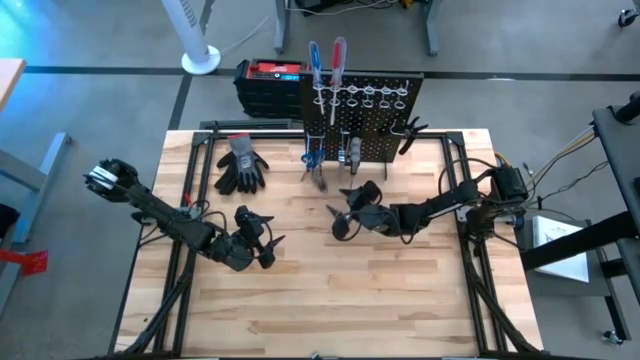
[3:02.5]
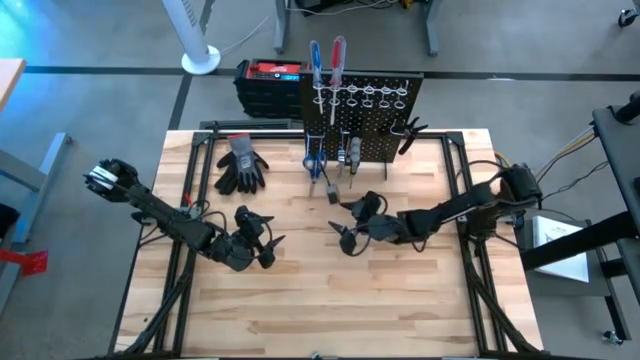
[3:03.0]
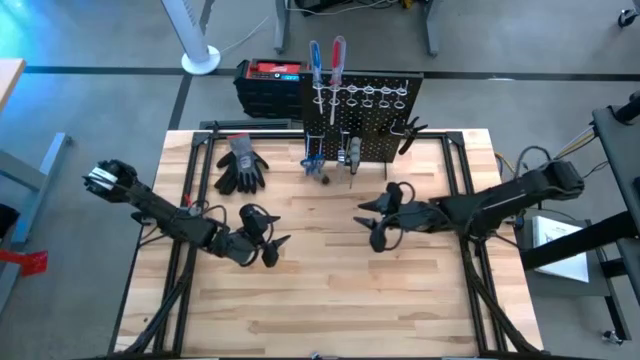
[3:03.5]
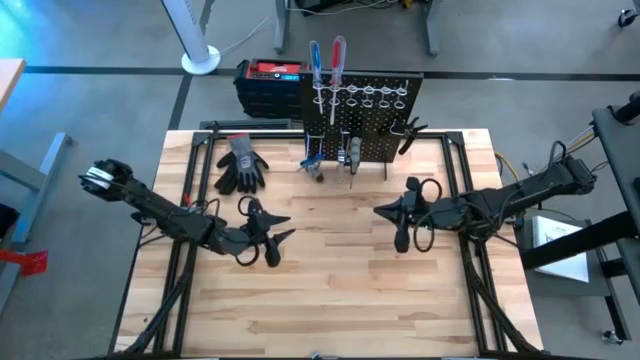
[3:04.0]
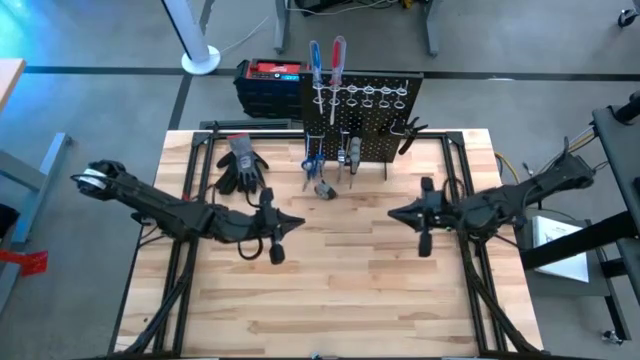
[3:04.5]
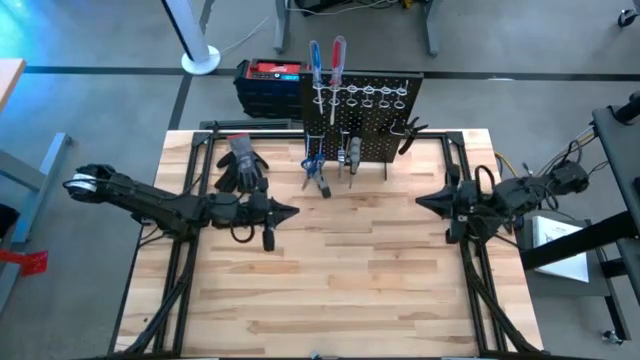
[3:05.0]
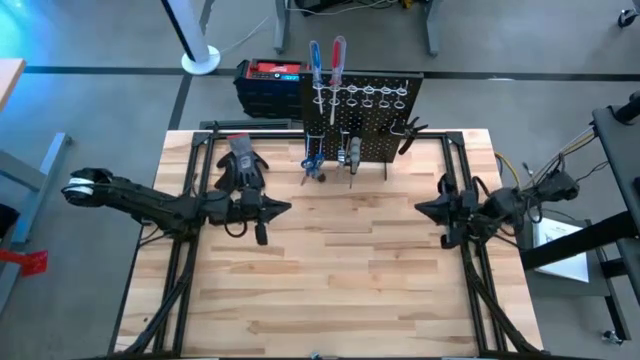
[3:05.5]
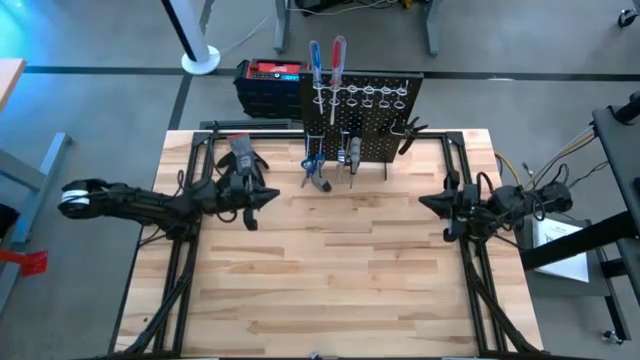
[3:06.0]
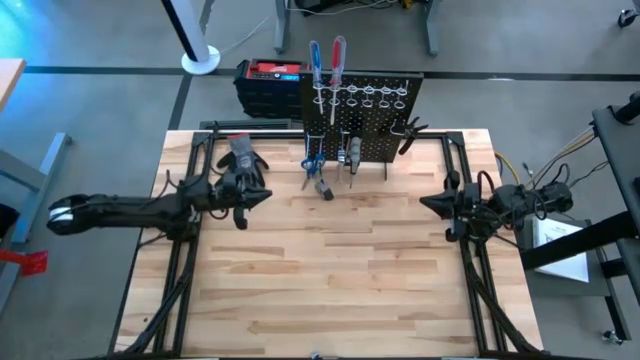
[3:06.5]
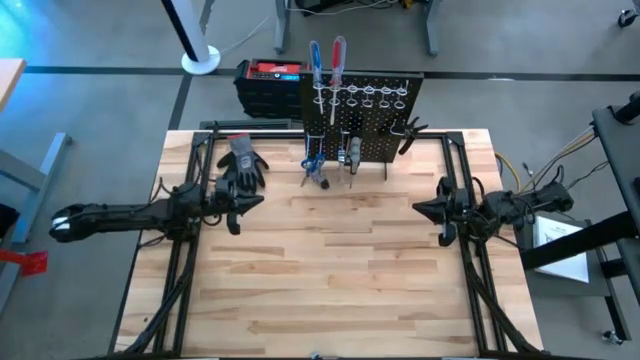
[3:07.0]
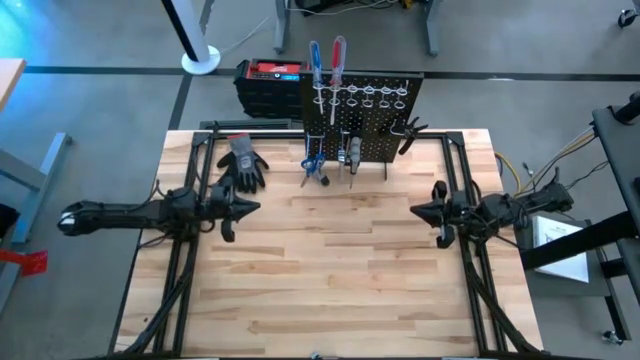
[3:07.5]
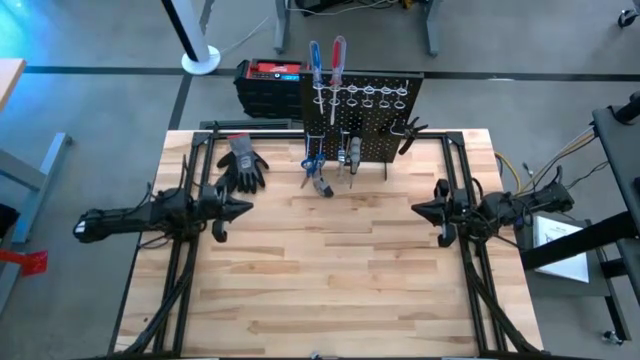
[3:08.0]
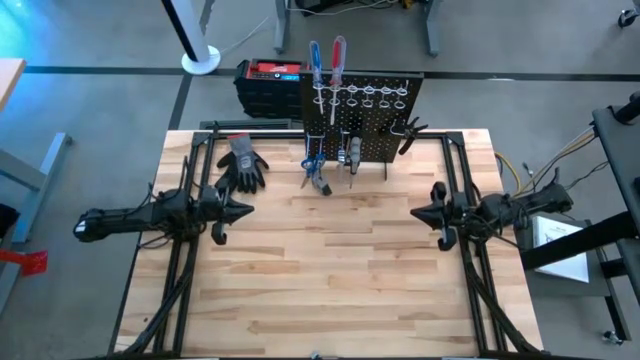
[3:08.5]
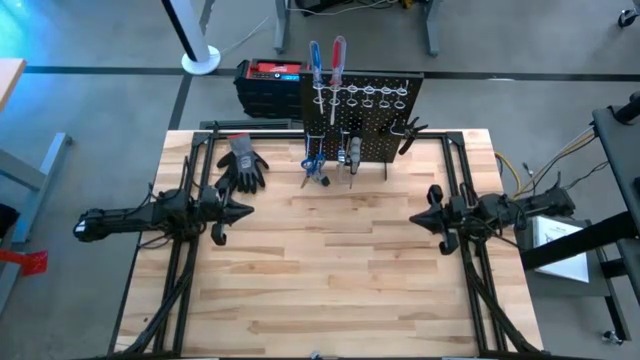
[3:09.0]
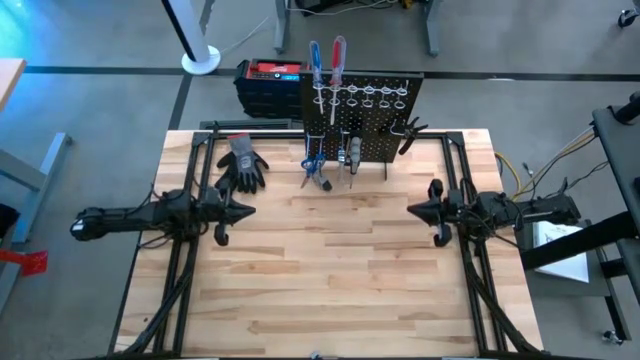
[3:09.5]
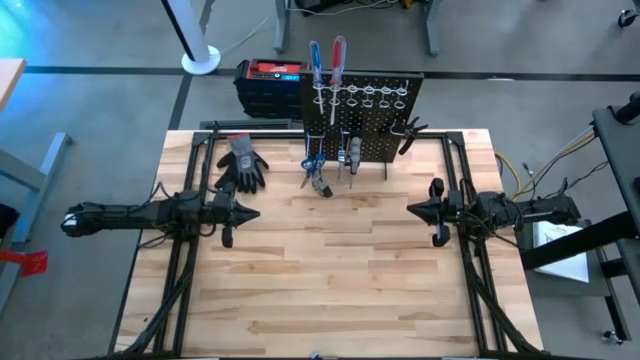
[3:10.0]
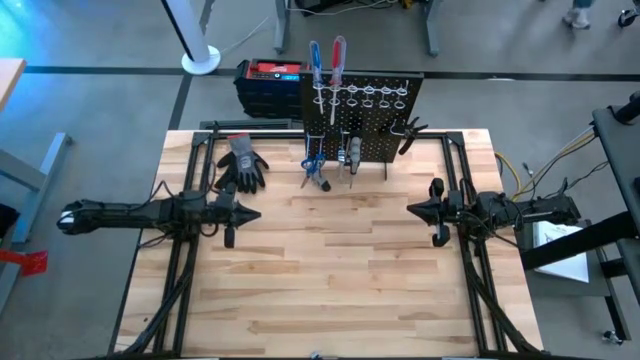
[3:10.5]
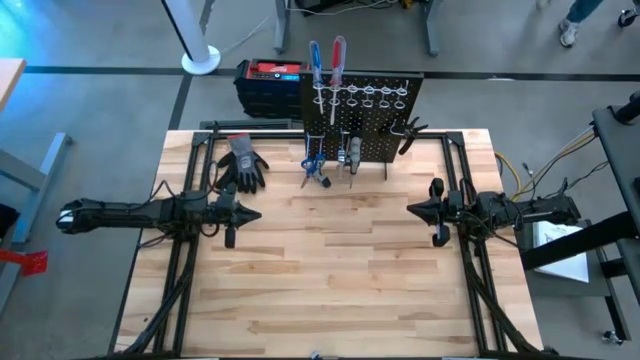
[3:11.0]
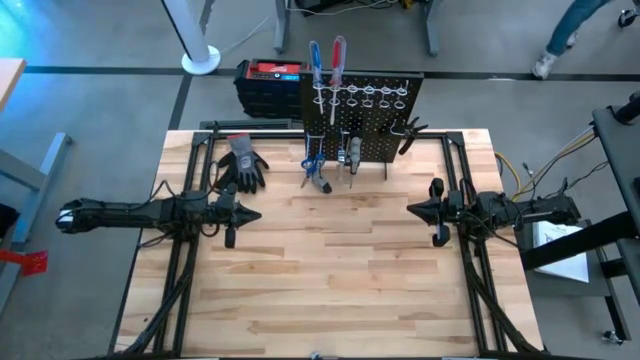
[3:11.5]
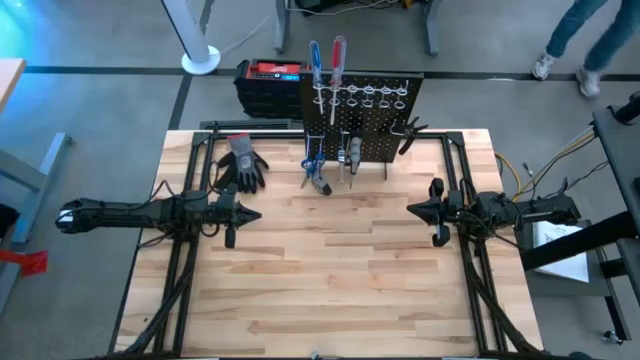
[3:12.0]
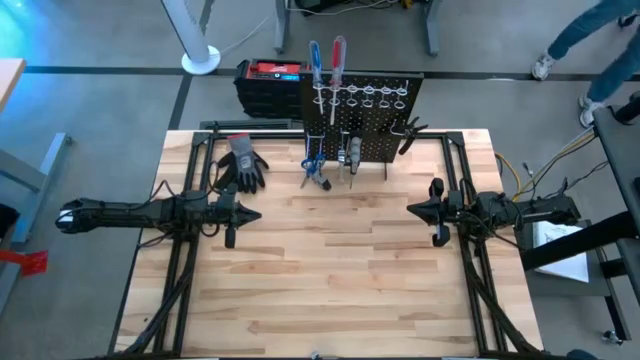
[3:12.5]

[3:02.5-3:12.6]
Task: Hang tools onto peg board
Return to Home Position

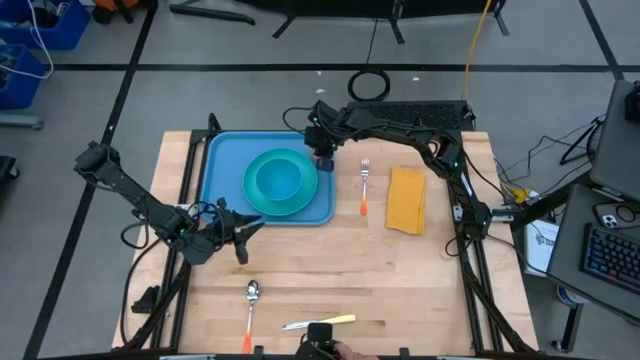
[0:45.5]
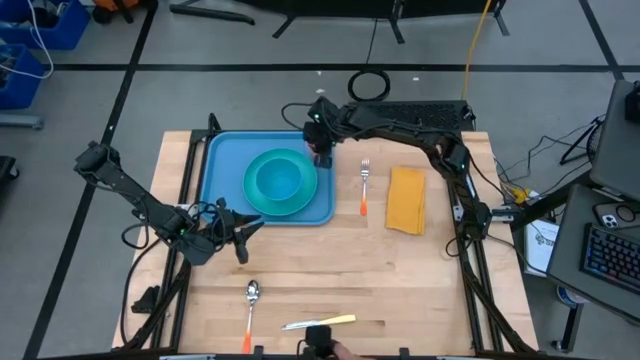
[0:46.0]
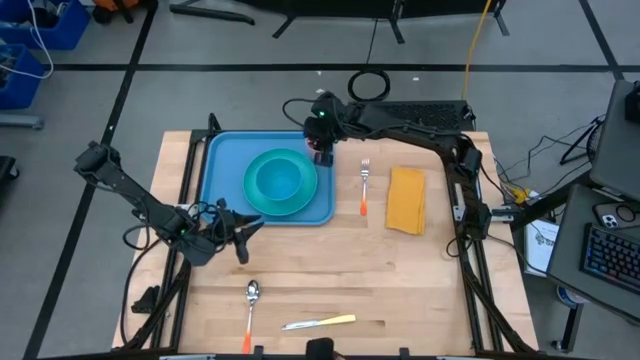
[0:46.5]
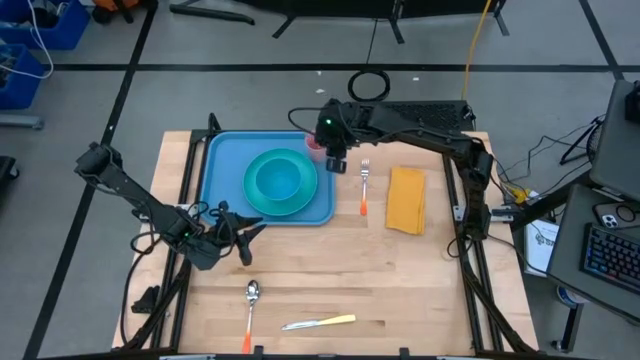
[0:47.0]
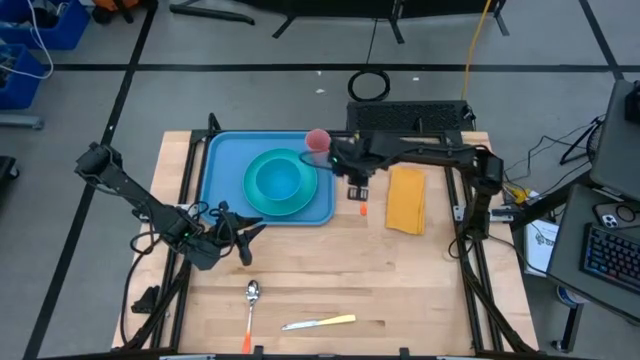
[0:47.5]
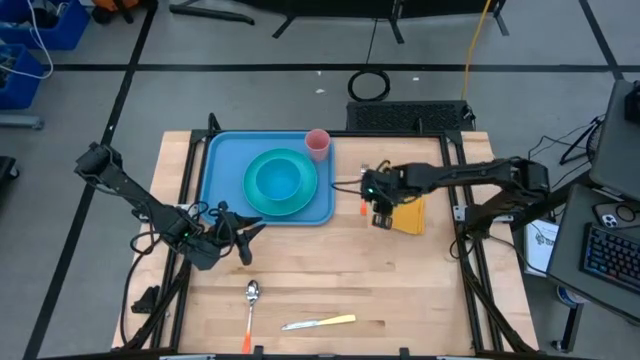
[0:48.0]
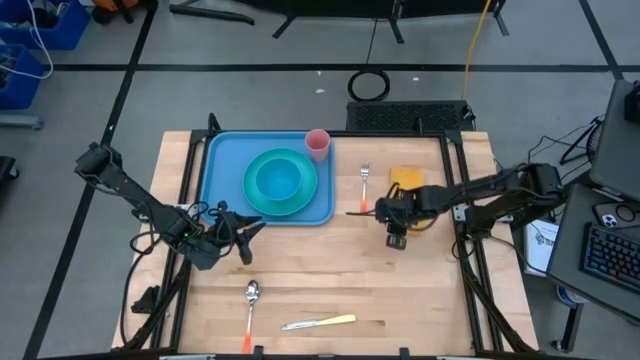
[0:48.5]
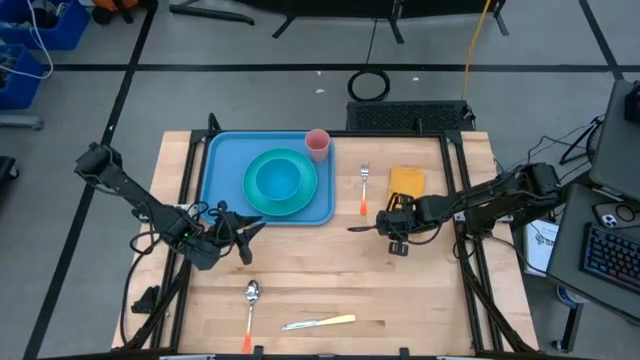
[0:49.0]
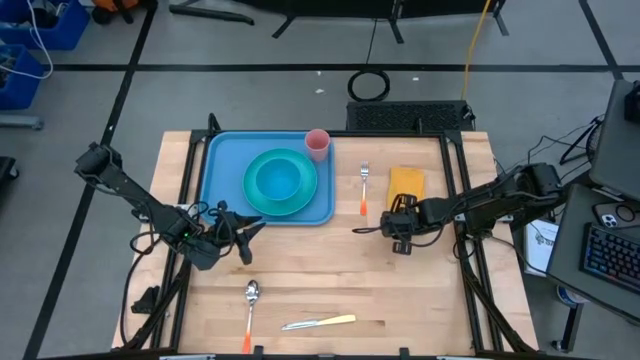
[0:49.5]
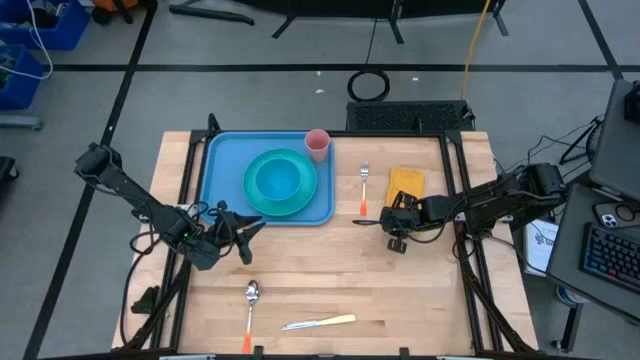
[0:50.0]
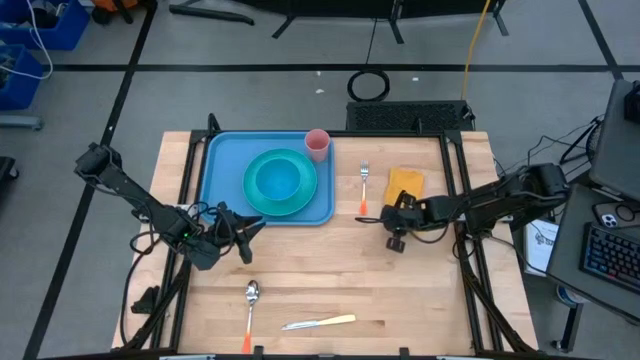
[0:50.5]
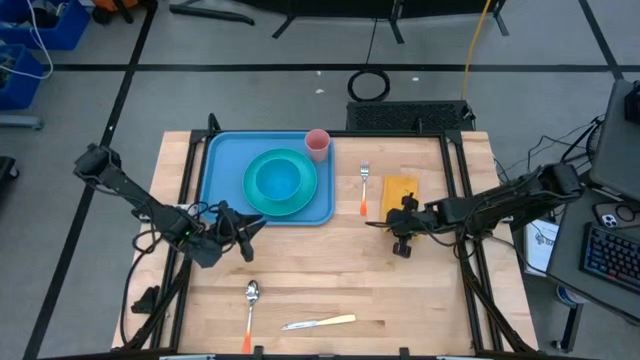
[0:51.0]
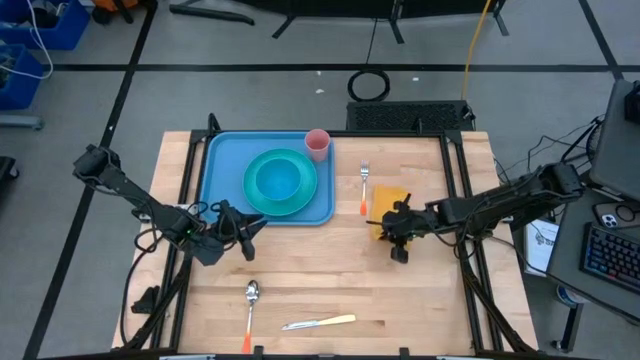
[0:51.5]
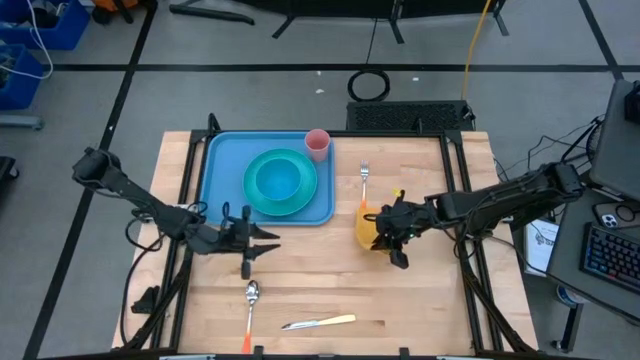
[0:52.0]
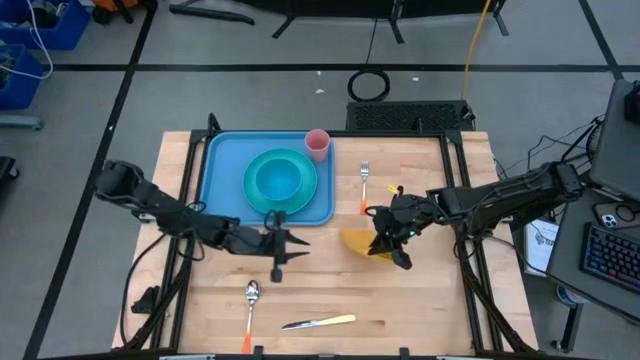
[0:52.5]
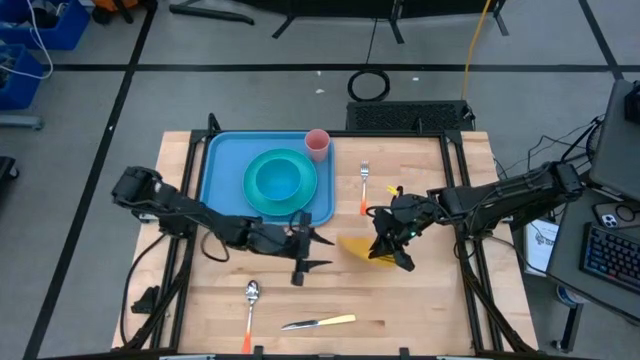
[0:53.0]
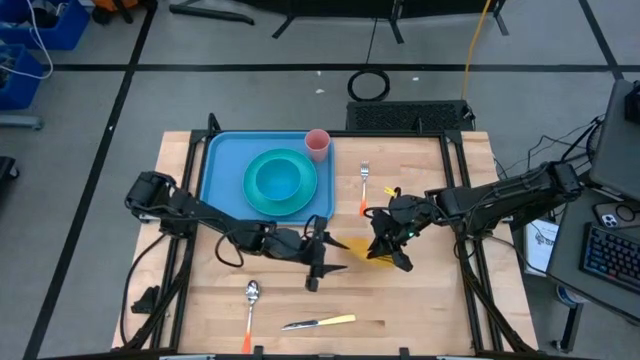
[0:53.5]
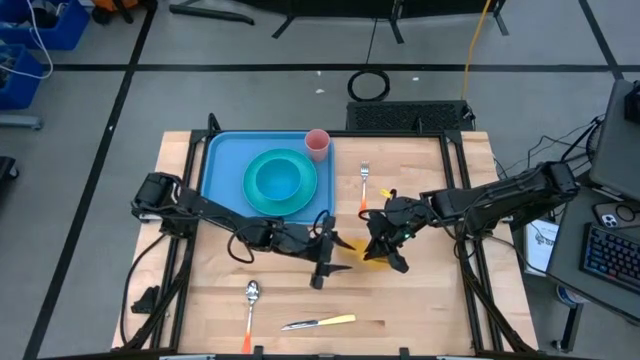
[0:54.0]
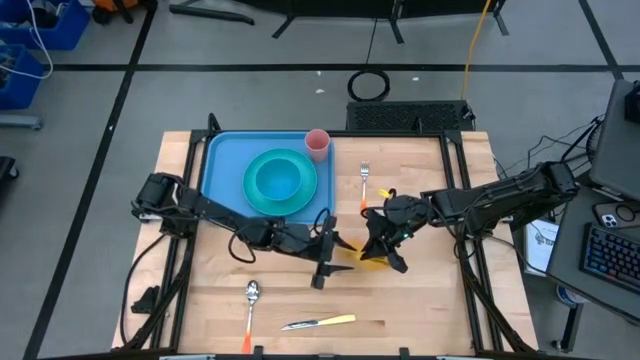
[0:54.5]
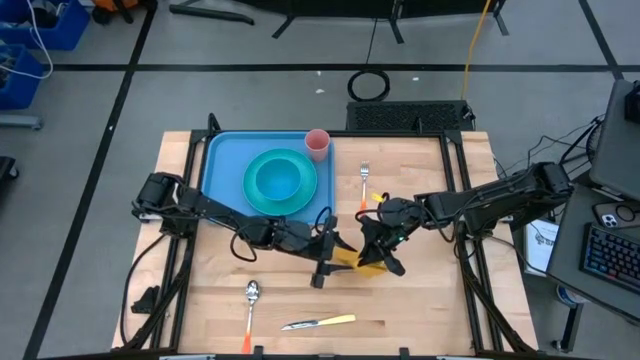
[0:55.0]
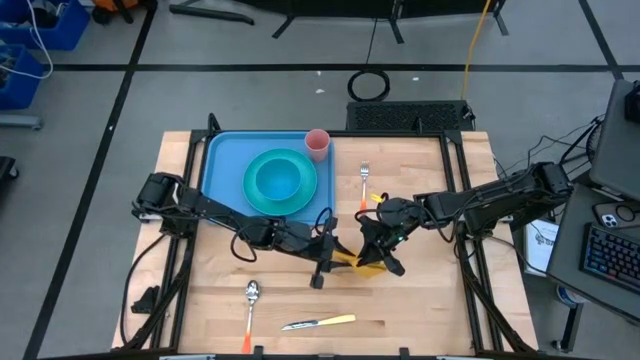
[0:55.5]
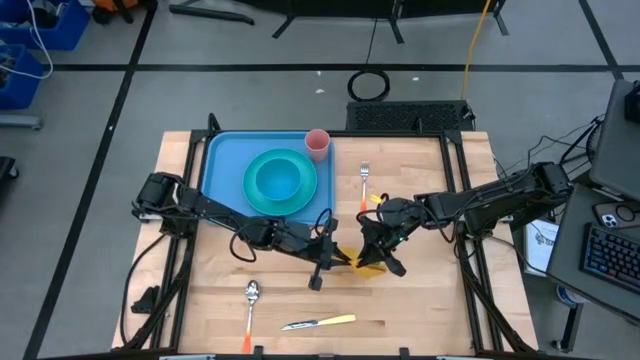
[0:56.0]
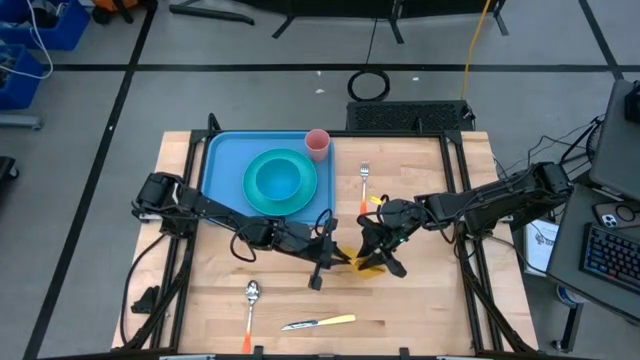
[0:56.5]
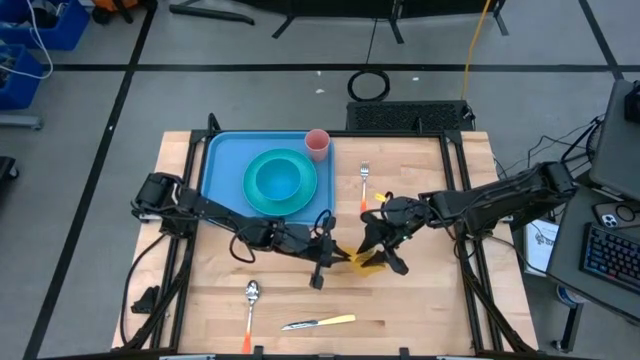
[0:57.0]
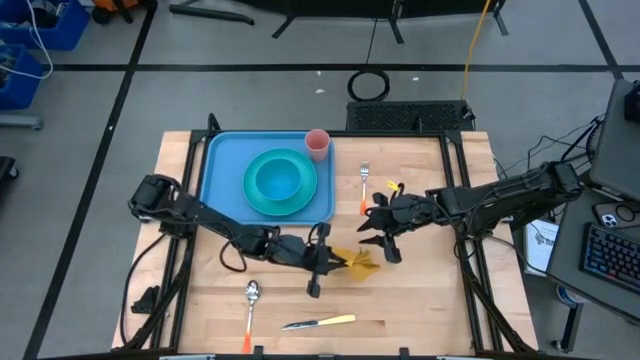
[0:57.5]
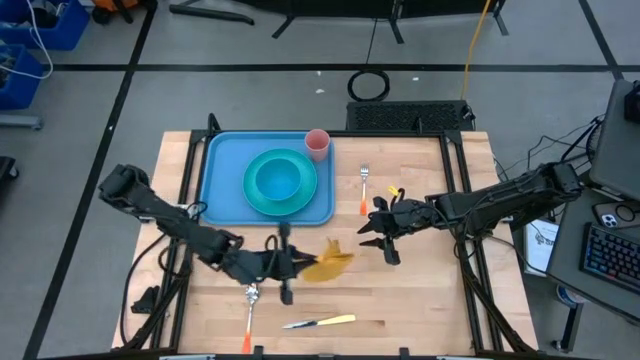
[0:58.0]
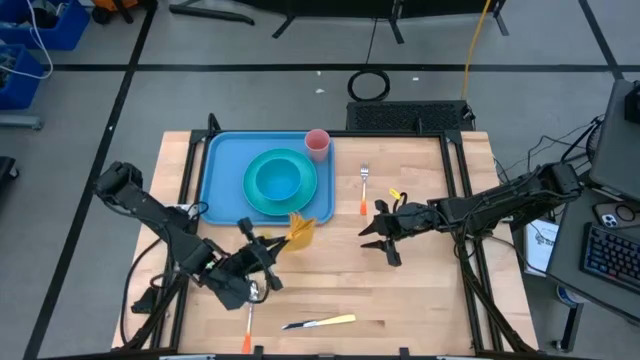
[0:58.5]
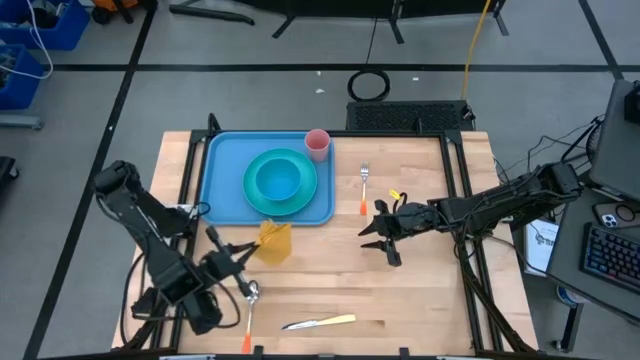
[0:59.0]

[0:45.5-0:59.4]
Task: Set up tray
Put the yellow napkin to the left of the green plate on the blue serving tray
